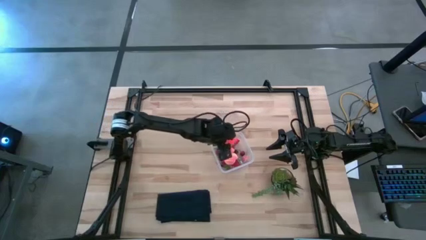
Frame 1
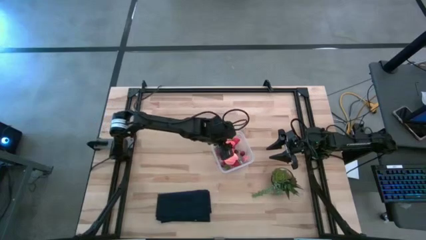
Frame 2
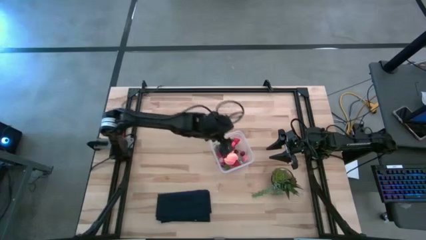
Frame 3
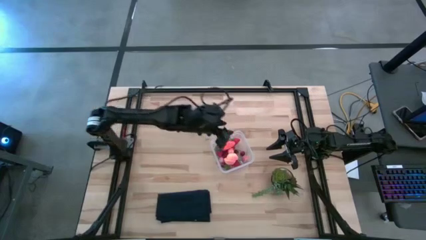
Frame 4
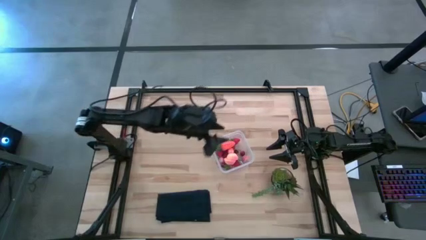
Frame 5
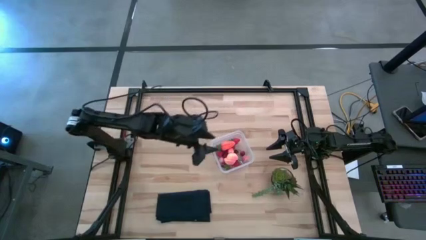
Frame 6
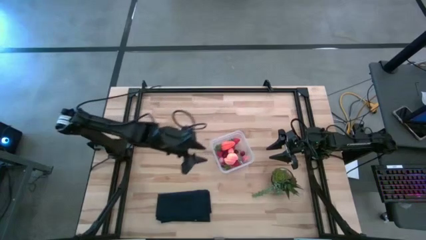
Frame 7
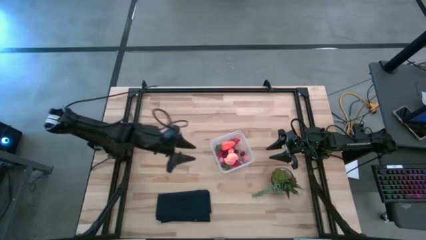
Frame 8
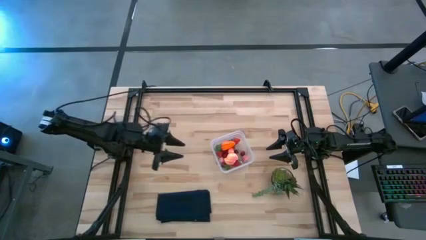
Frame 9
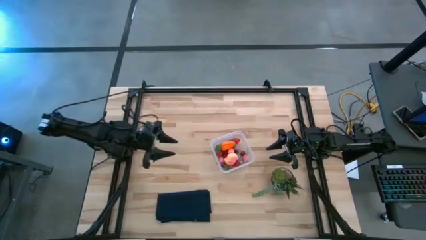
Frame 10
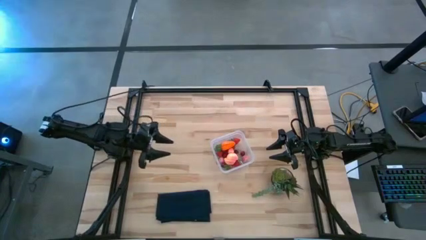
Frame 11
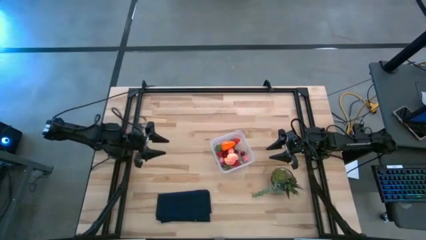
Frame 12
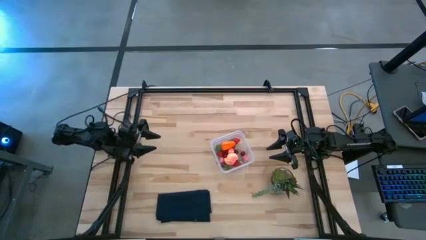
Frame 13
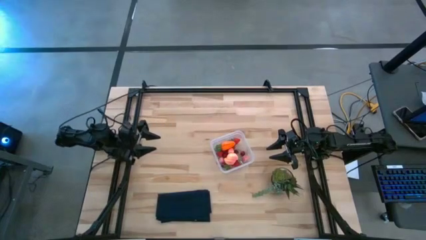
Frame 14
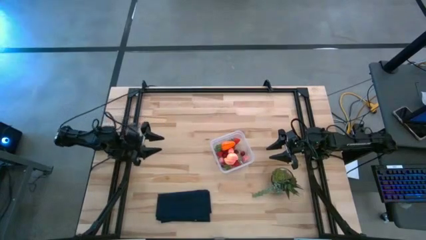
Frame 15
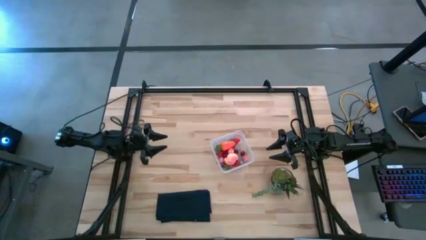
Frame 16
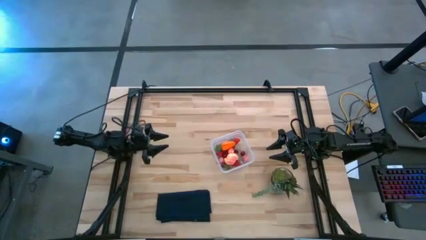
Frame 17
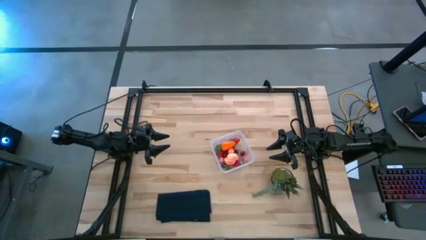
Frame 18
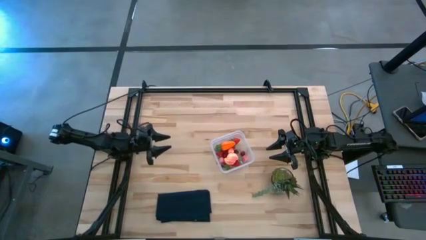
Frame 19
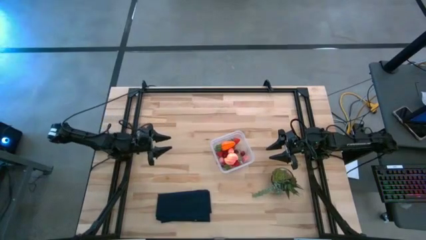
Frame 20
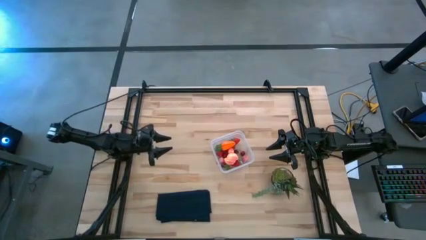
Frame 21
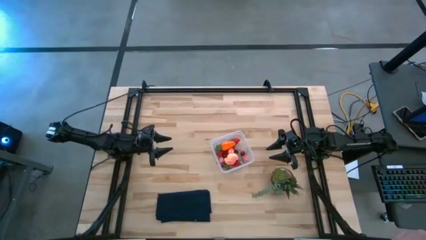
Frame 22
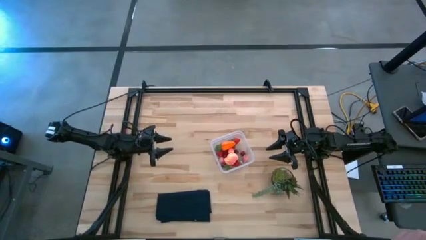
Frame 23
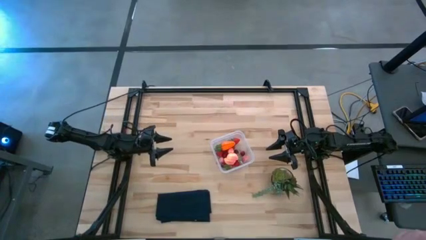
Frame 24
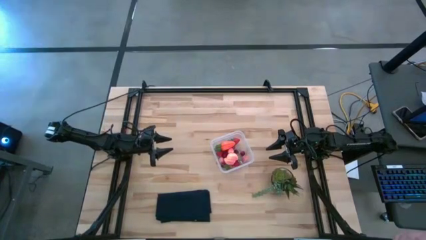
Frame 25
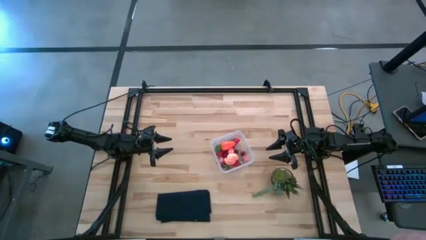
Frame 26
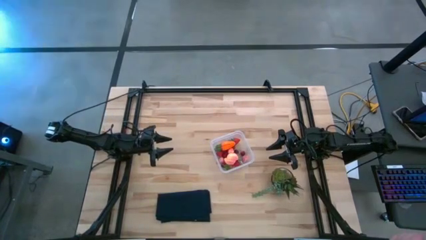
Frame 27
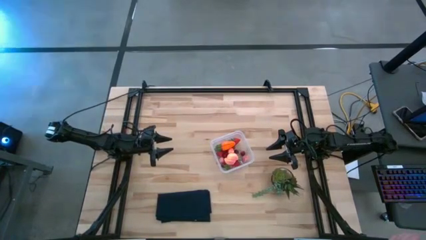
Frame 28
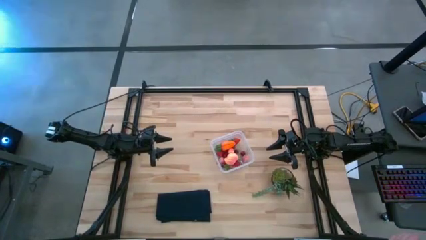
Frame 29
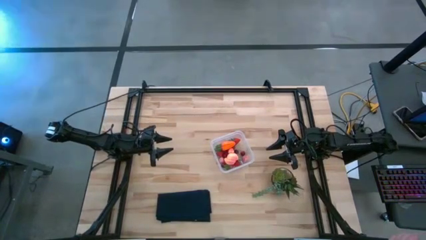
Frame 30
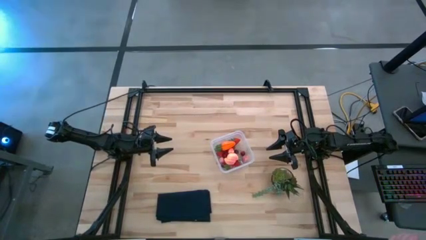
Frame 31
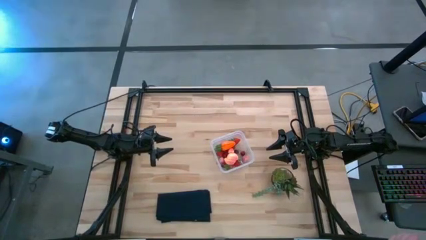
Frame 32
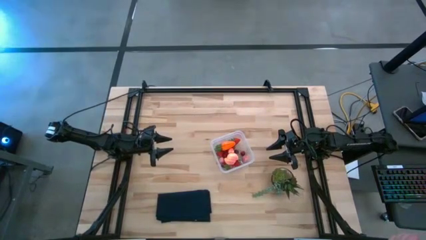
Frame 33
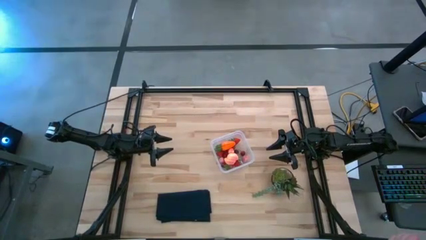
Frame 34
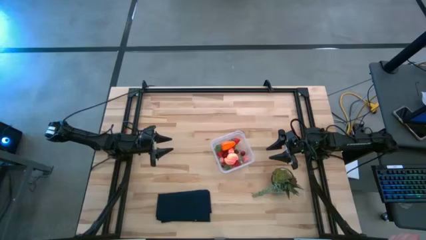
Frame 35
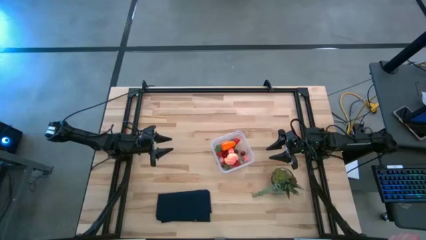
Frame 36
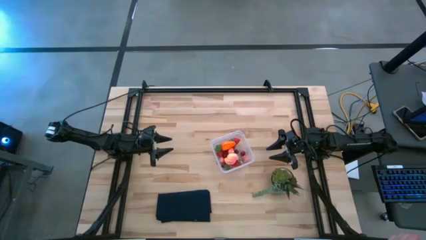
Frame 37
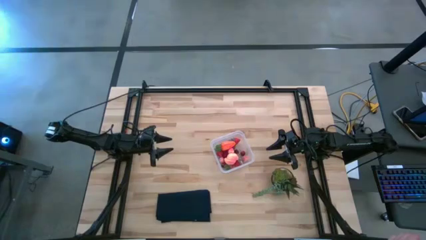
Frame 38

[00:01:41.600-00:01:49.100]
Task: Pick and placing Produce into tupperware
Return to Home Position

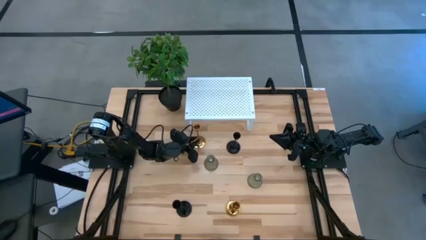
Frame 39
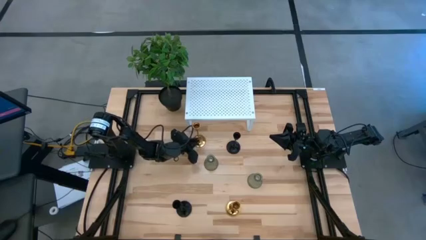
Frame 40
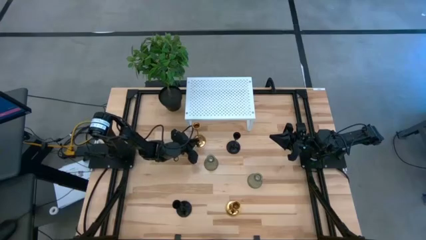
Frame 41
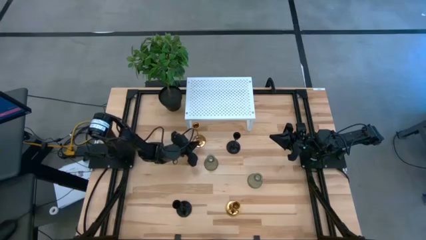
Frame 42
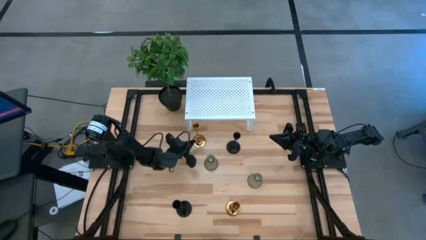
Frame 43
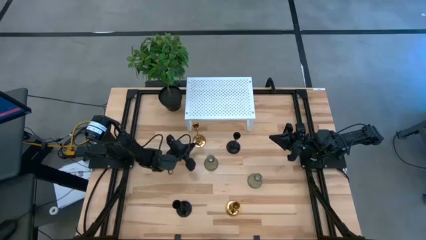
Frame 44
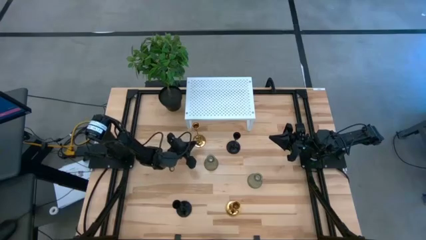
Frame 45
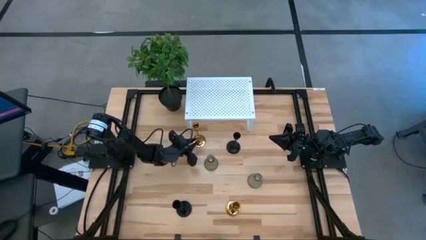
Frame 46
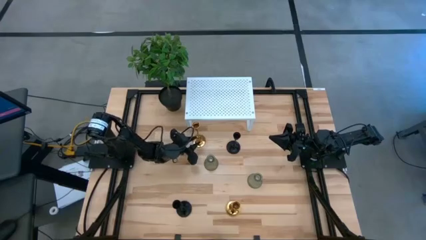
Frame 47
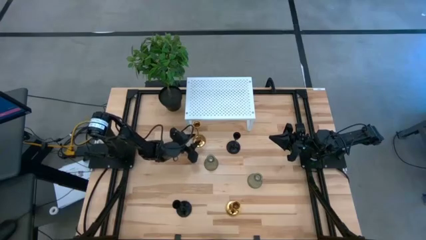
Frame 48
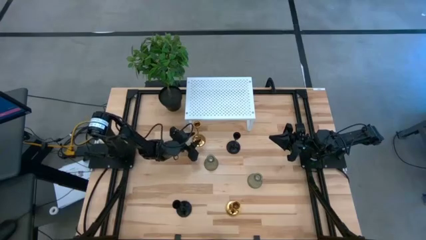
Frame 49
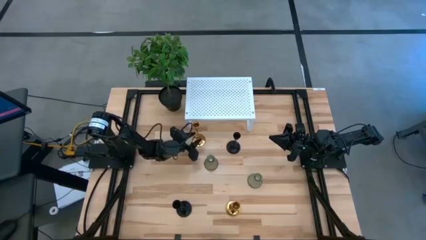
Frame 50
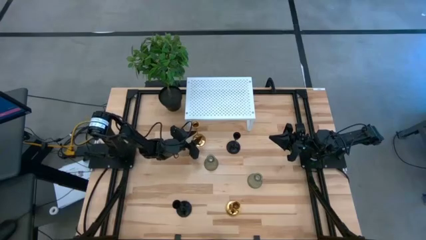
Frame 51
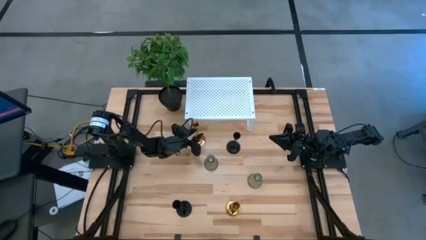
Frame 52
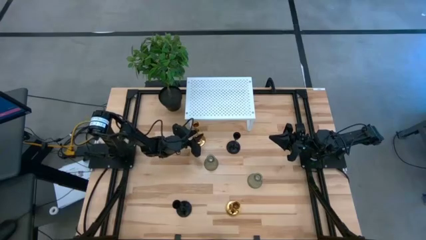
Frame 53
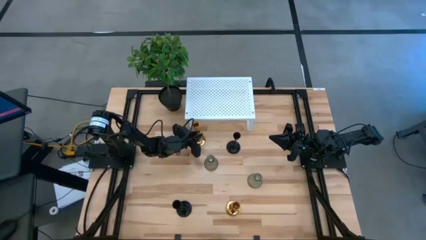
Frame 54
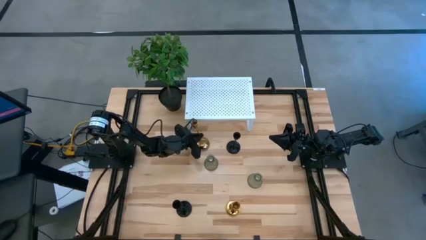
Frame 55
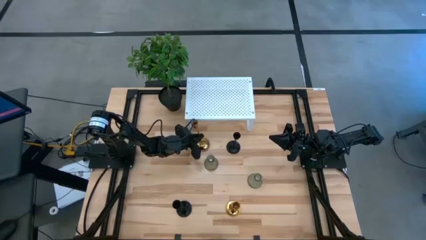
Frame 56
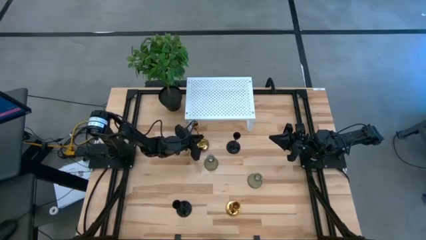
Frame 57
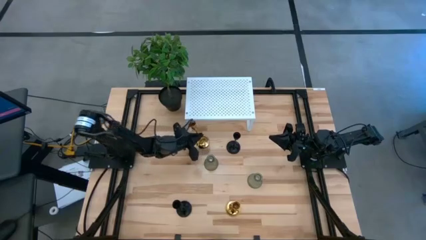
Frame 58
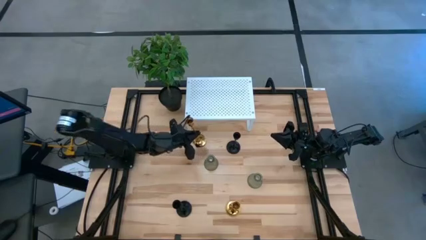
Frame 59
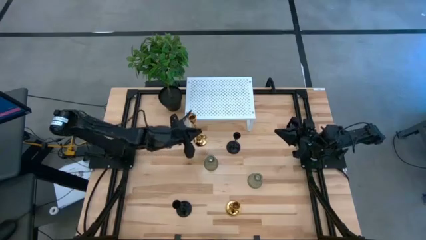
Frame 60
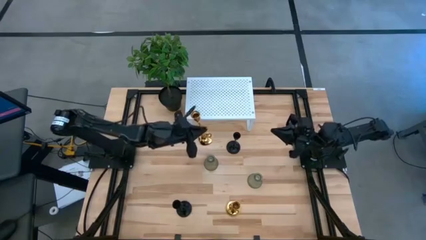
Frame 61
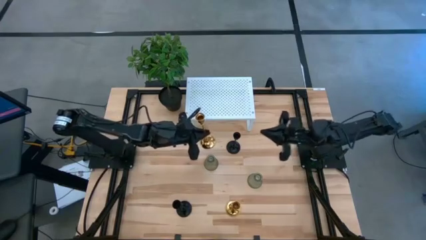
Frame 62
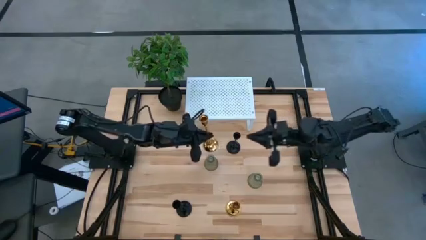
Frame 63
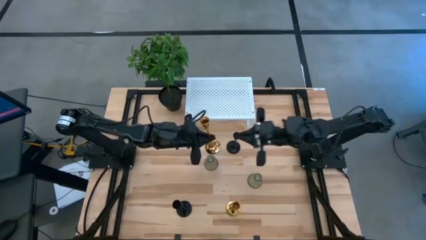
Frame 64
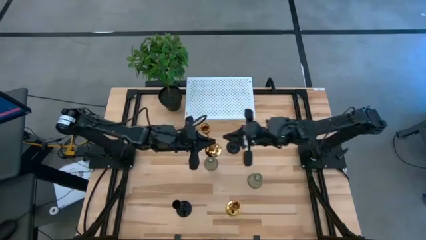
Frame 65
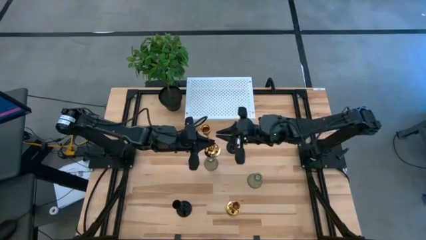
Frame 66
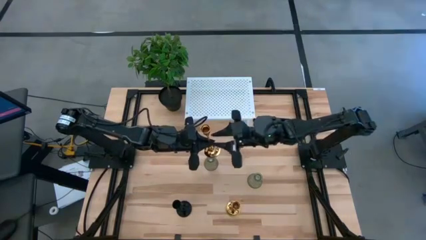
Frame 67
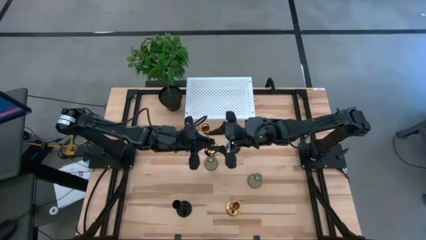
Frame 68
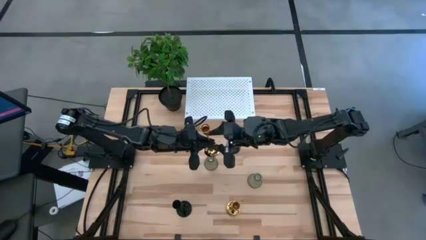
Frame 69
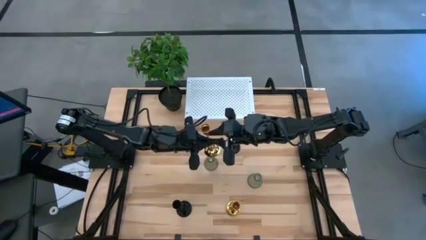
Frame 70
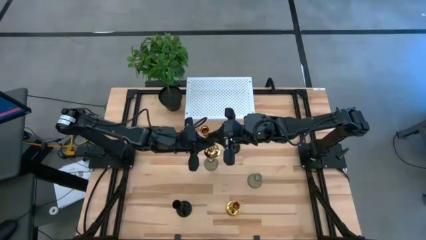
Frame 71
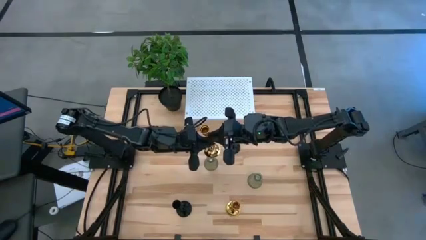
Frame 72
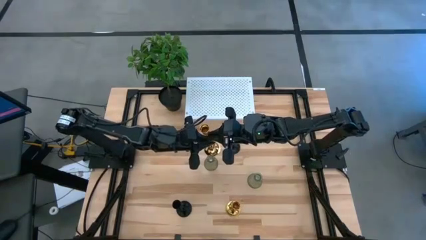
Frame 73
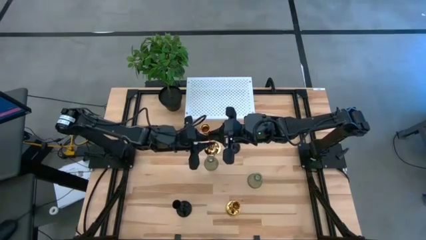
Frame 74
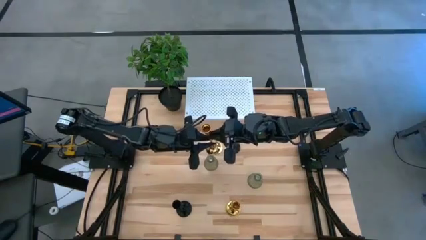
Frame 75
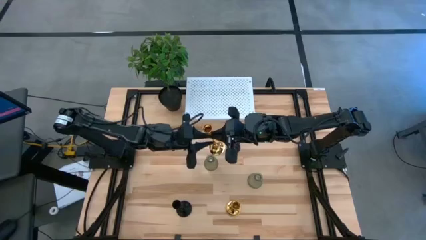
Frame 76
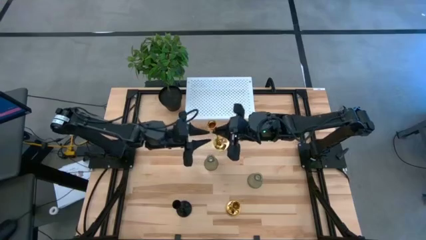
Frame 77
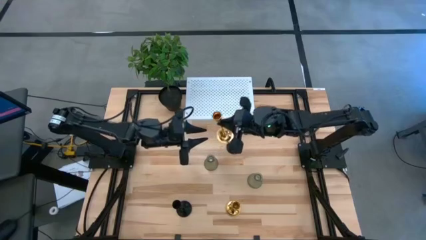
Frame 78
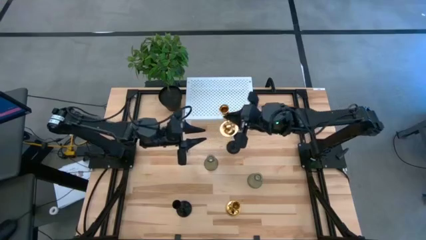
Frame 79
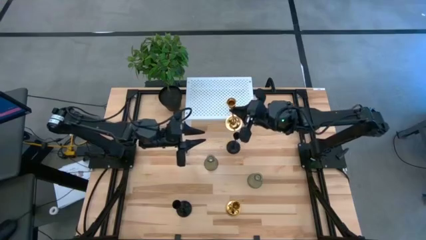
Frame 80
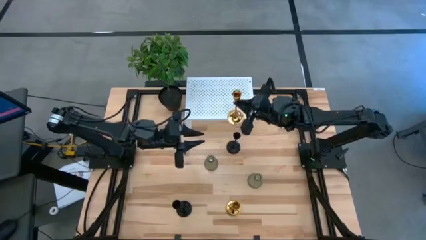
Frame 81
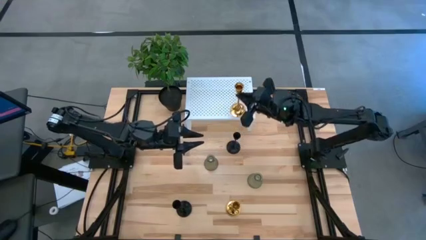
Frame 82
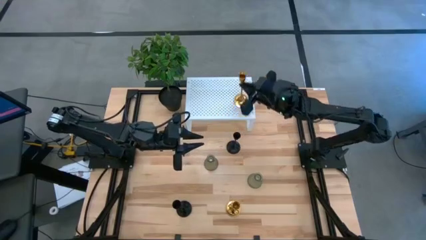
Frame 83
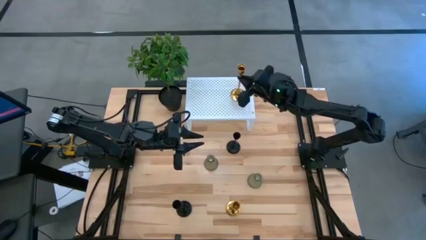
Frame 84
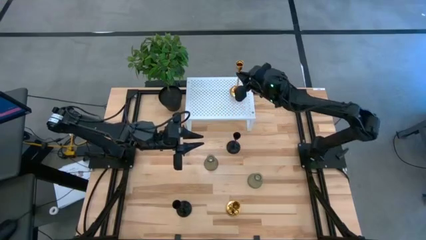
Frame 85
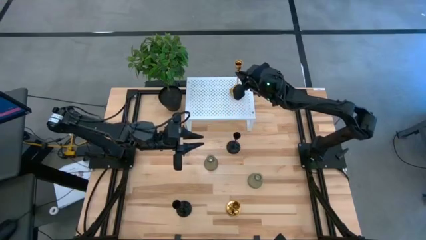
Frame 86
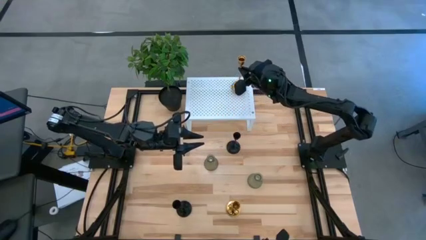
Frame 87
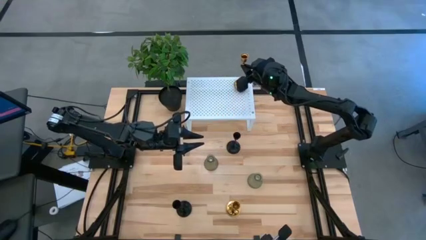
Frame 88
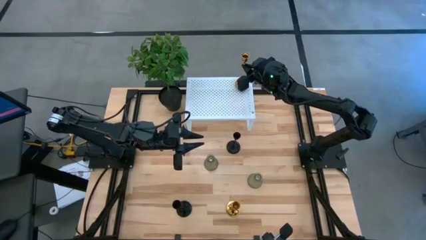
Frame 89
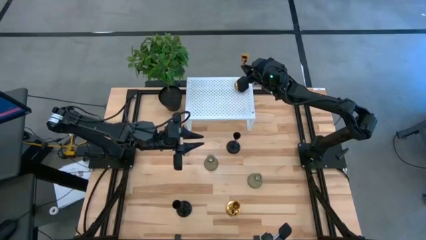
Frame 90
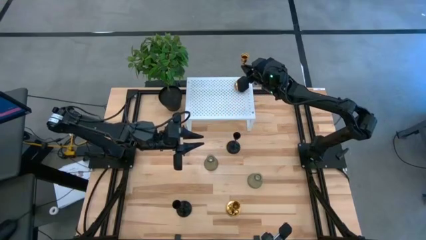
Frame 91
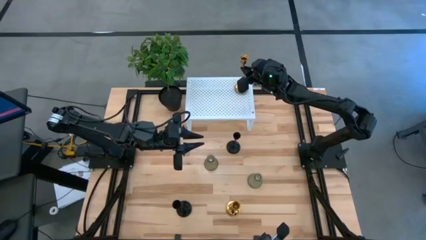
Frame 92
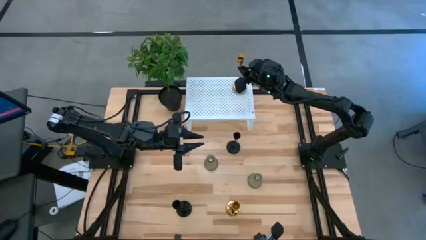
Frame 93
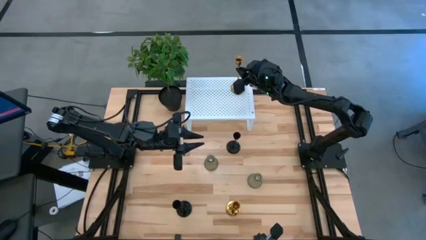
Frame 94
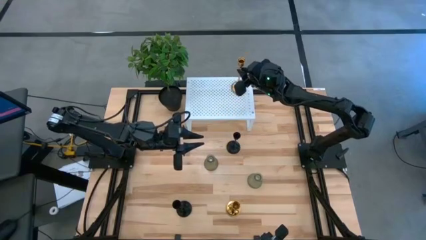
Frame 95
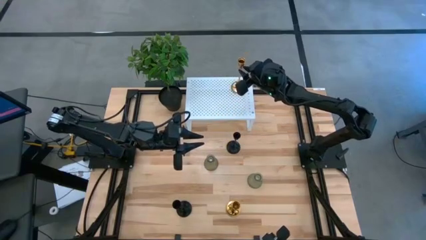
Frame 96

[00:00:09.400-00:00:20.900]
Task: Pick & Place candle stick holders
Put the top gold candle holder on the shelf
